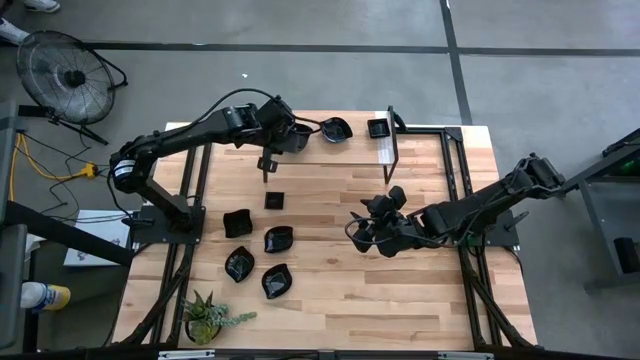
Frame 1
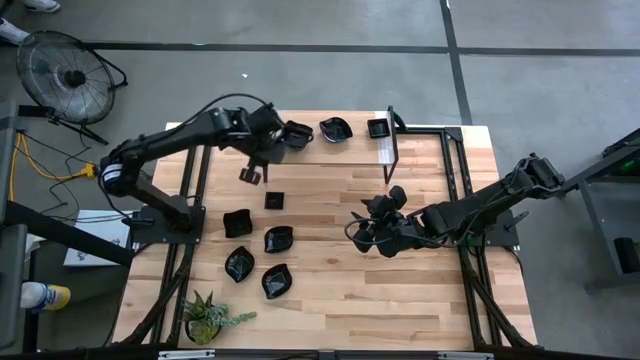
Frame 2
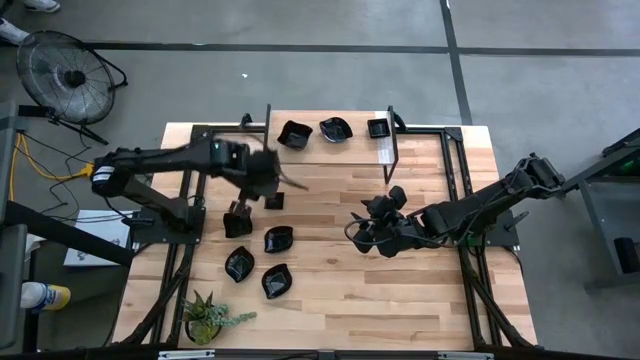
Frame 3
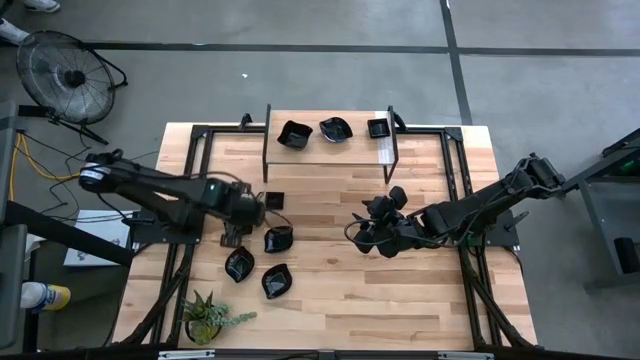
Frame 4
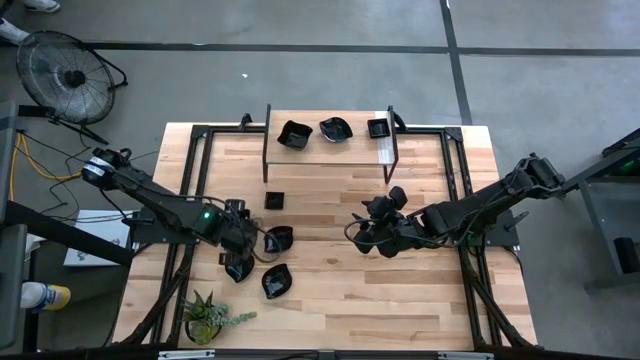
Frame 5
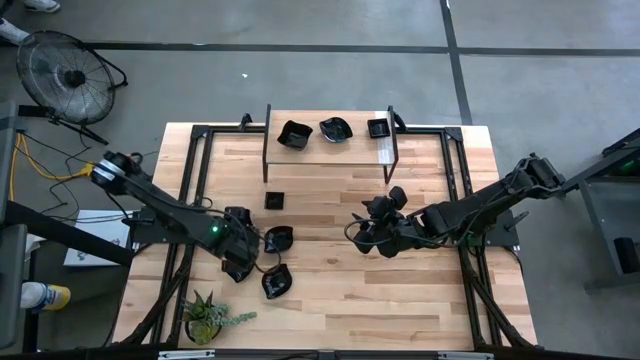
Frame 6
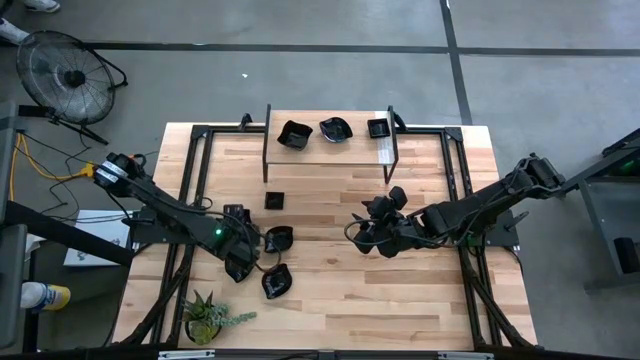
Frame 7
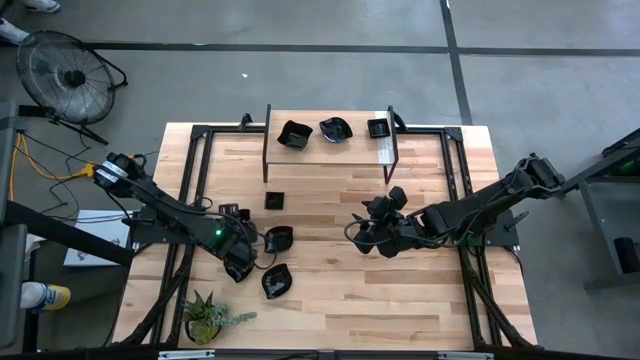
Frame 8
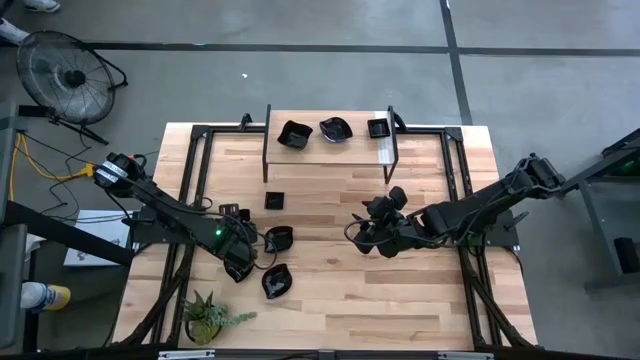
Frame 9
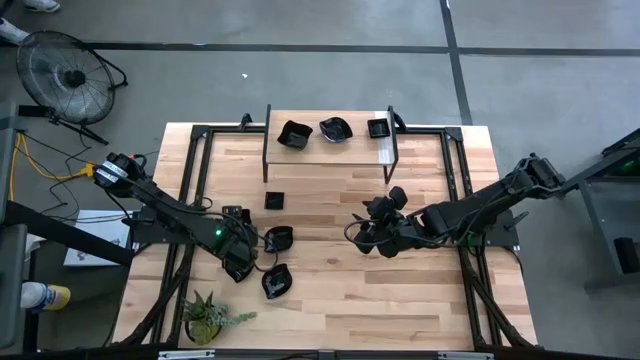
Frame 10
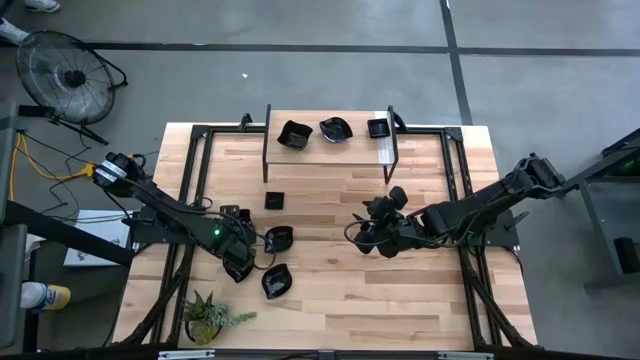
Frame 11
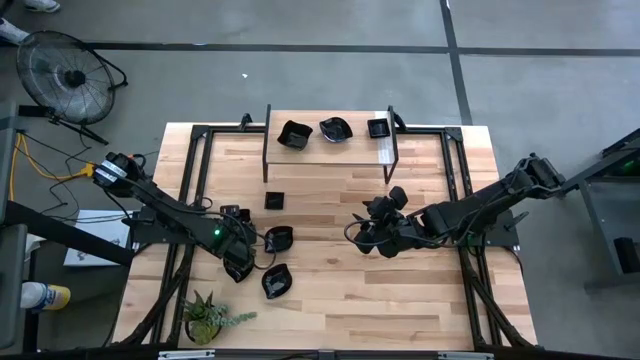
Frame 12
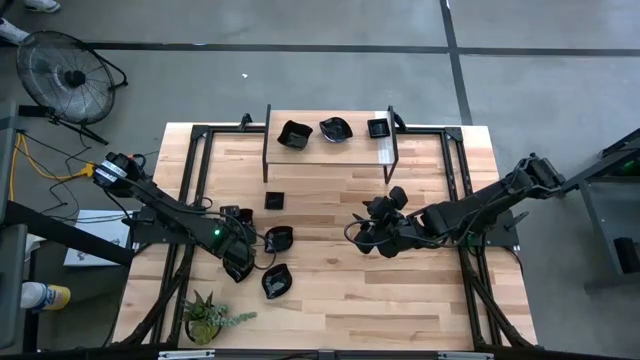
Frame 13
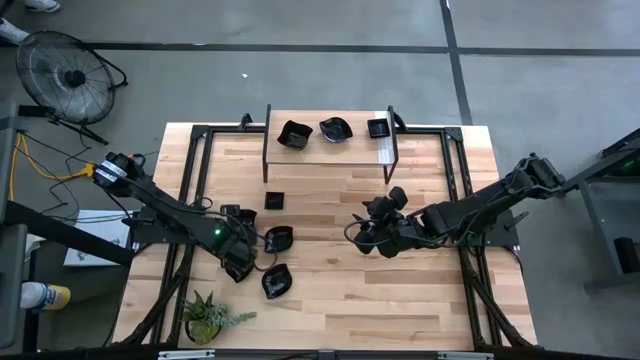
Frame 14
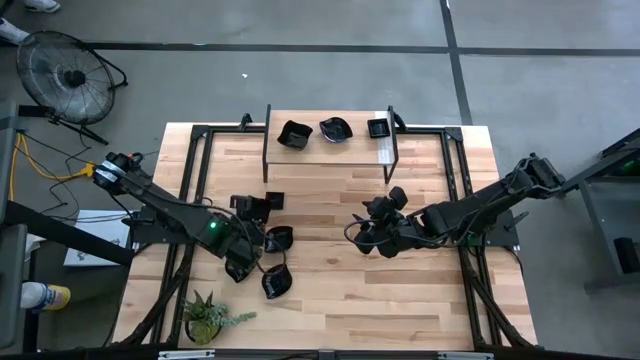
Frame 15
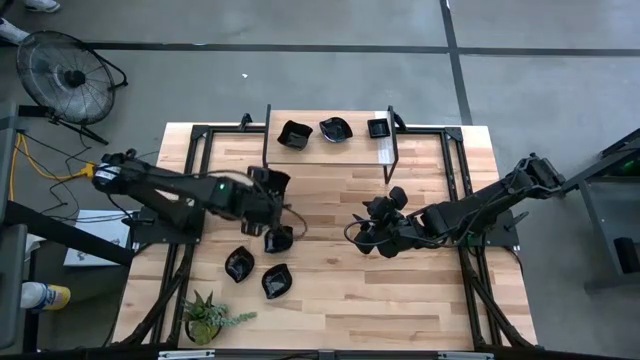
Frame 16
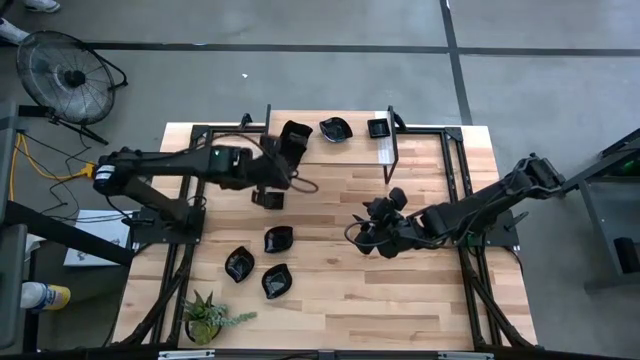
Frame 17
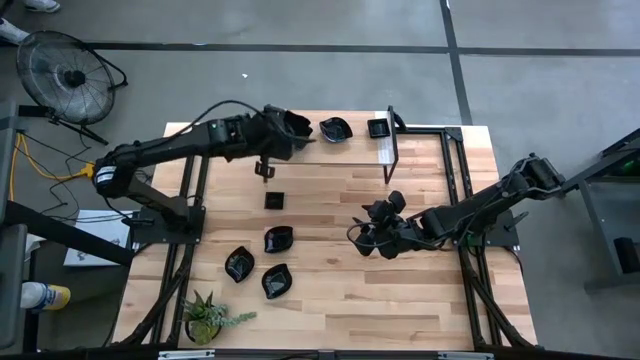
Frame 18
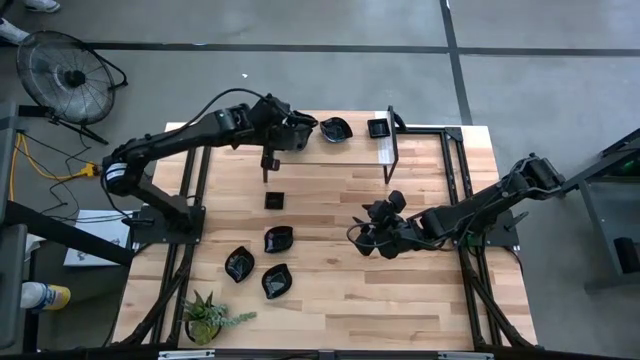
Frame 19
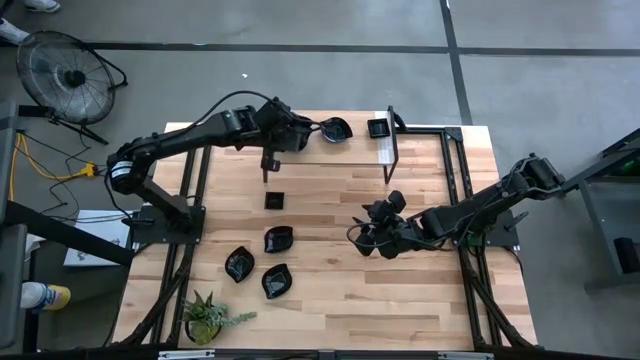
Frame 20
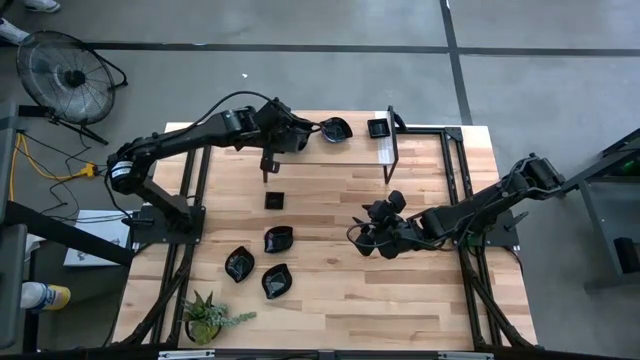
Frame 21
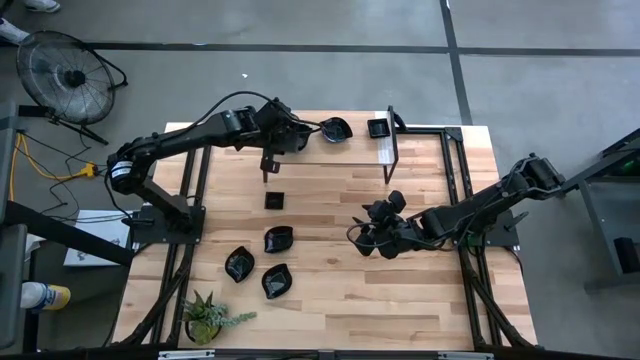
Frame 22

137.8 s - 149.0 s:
Task: Pick & Place Mini shaped plates
Stack the black distorted square plate on top of the black distorted square plate on the shelf

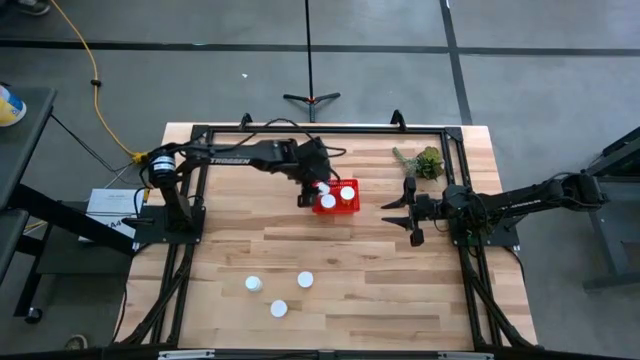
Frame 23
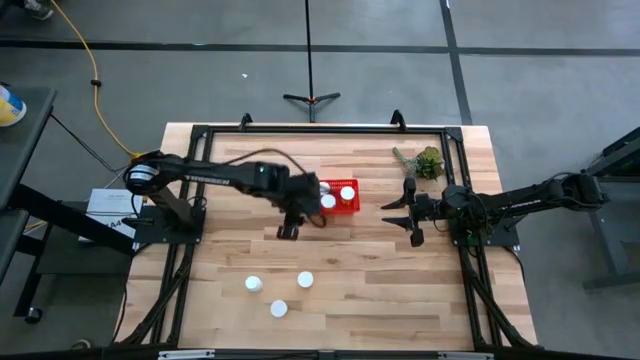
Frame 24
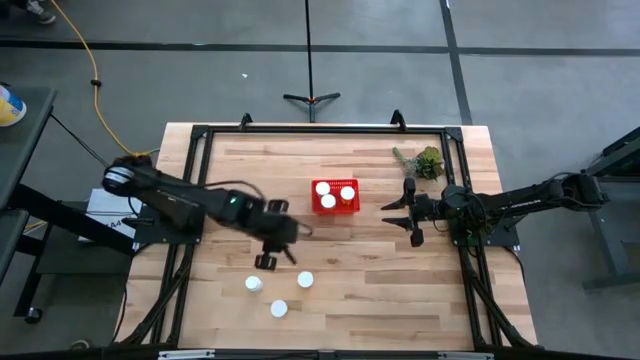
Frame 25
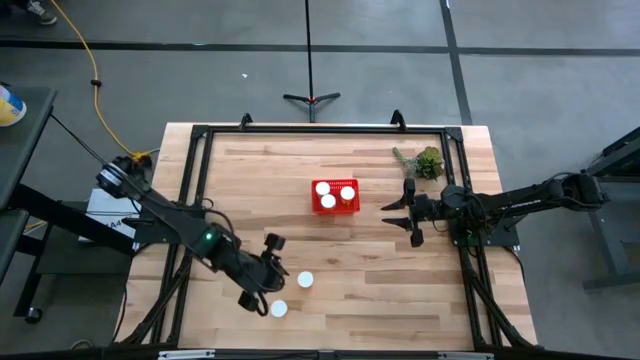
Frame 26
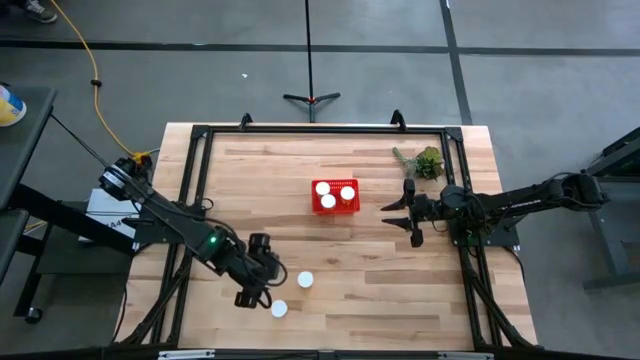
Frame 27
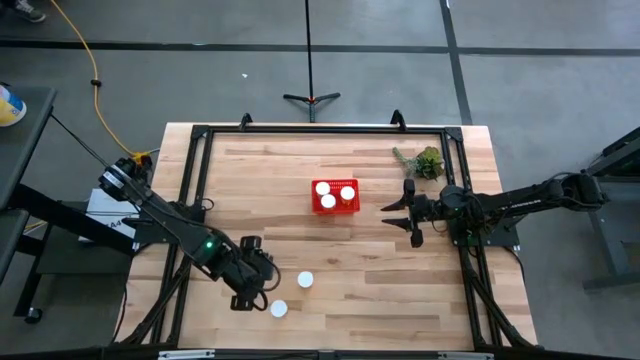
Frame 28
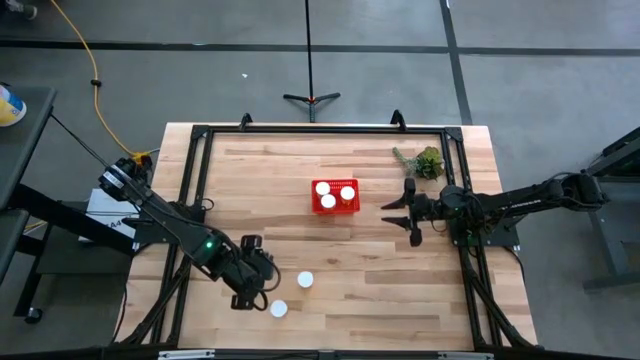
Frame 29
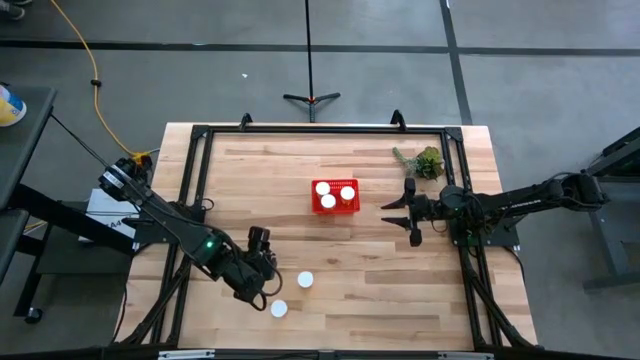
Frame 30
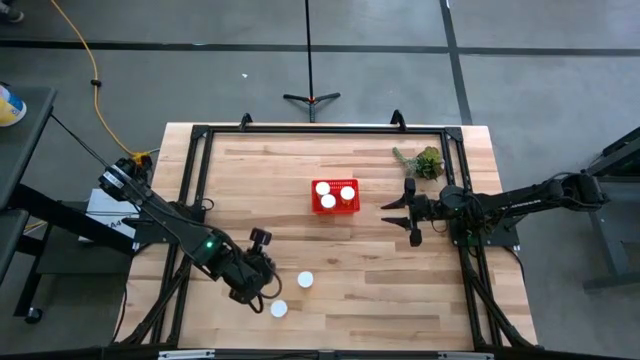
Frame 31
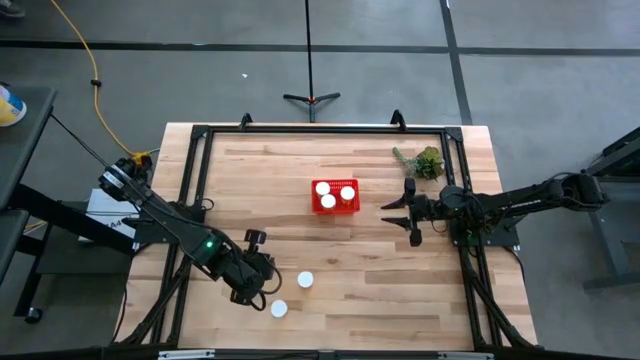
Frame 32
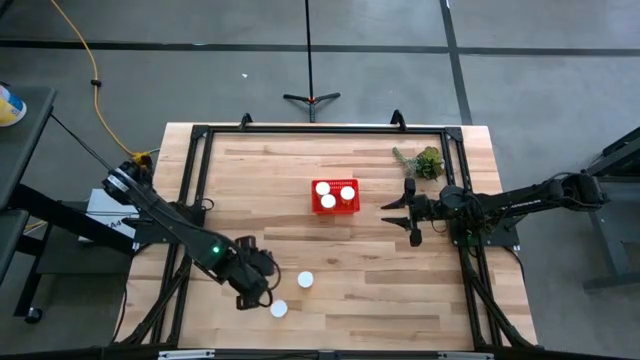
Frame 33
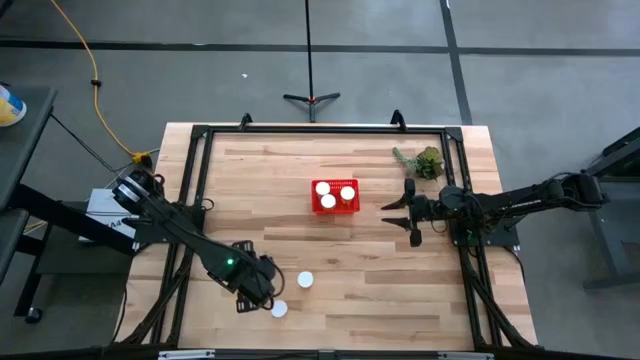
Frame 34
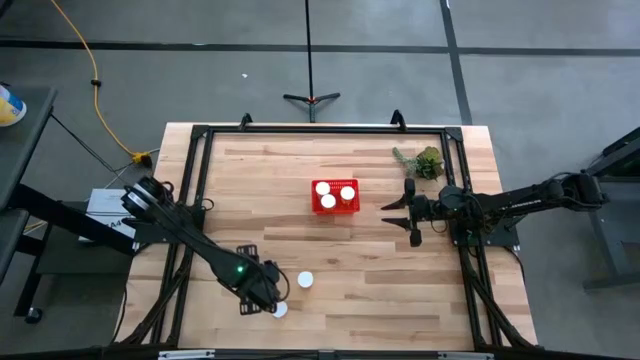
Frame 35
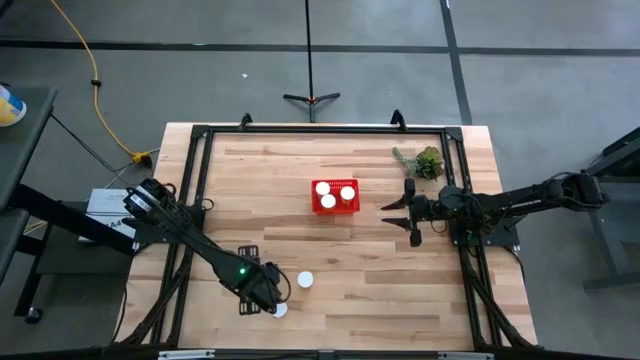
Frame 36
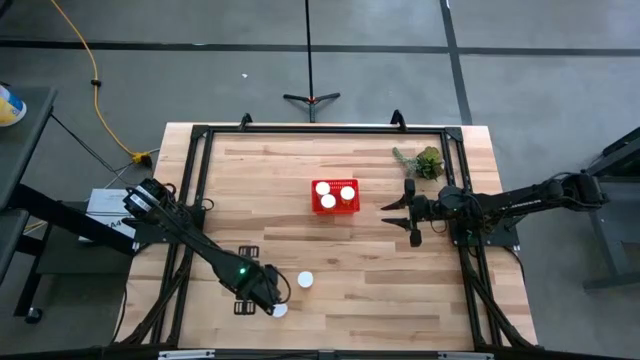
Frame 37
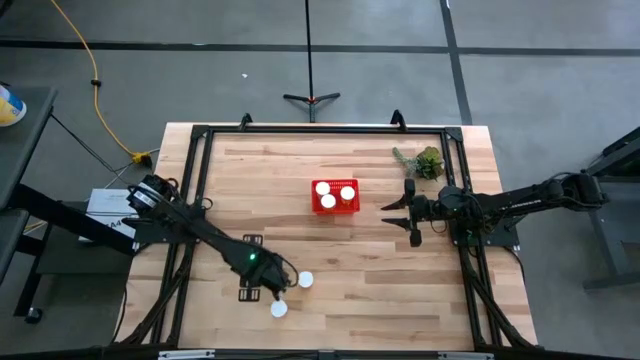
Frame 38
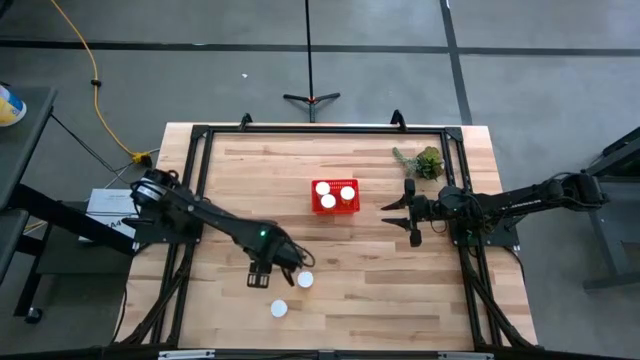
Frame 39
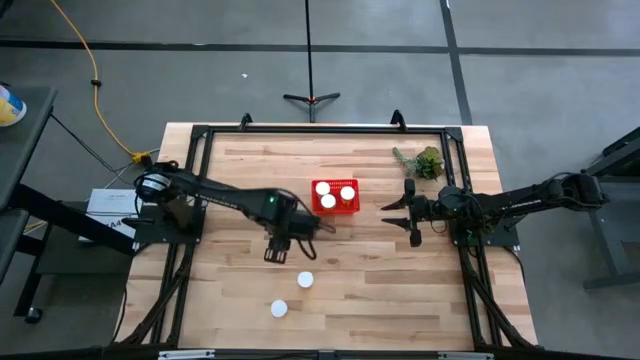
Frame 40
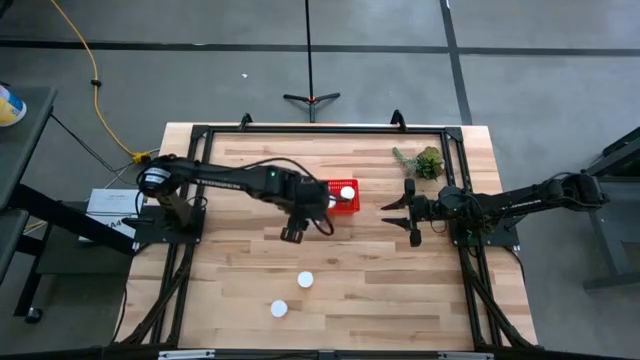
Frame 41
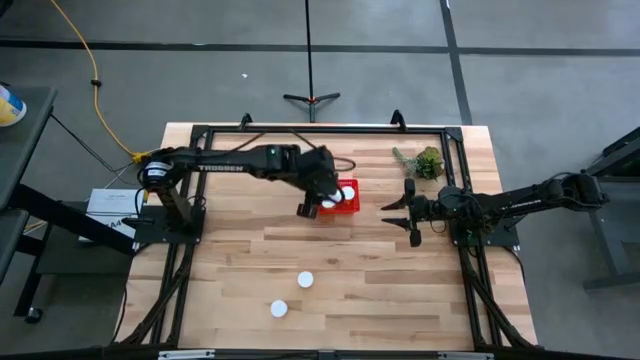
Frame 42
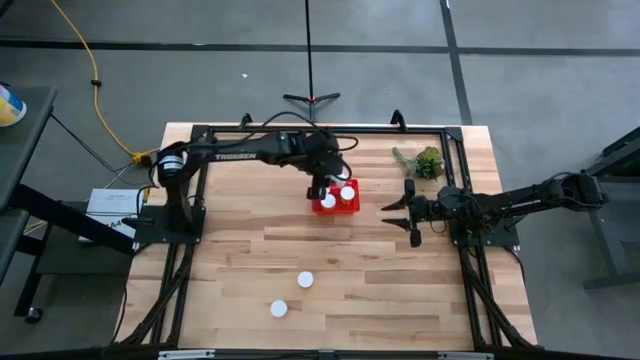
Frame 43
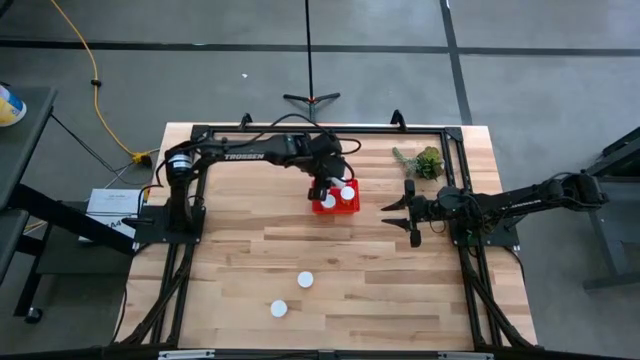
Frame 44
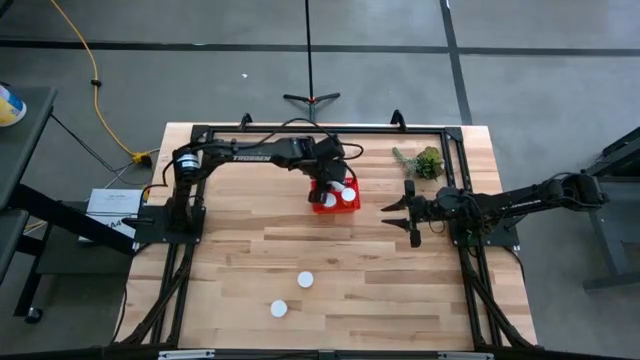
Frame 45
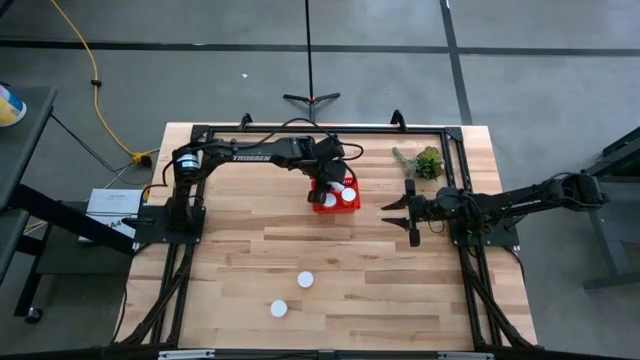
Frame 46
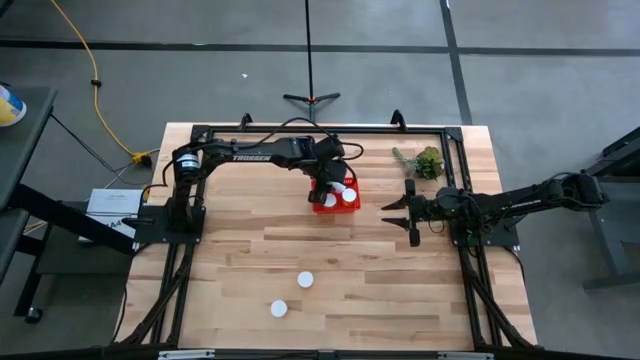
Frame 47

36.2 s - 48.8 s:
Task: Pick and place pill bottles into a basket
Put the white pill bottle into the red bin
